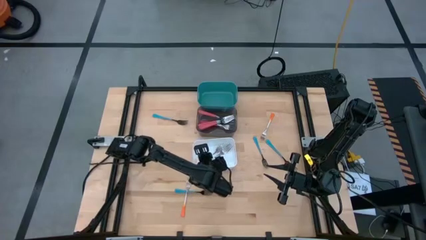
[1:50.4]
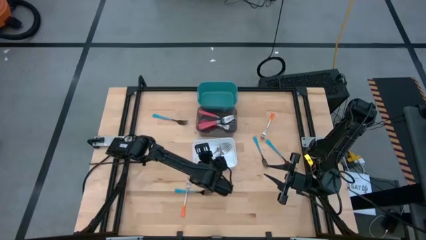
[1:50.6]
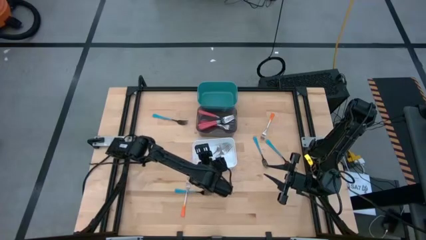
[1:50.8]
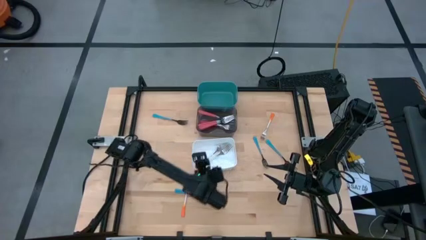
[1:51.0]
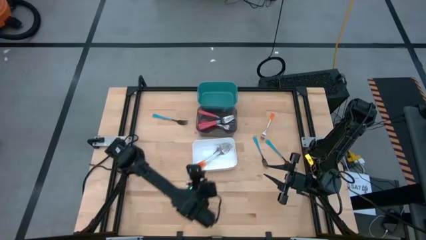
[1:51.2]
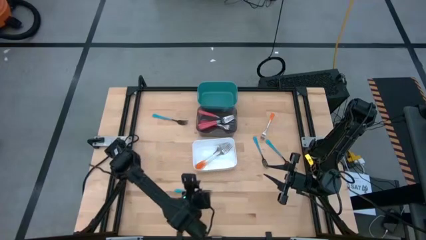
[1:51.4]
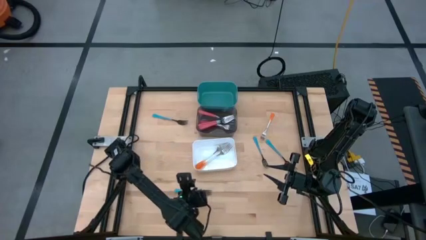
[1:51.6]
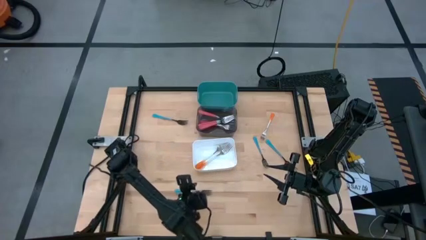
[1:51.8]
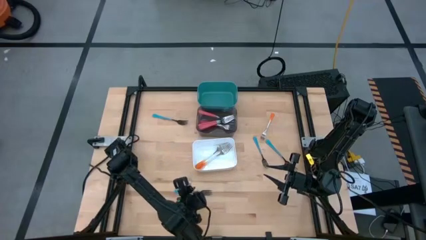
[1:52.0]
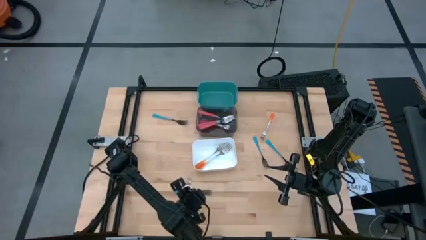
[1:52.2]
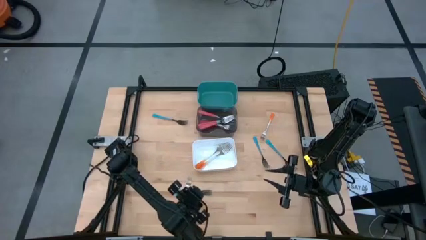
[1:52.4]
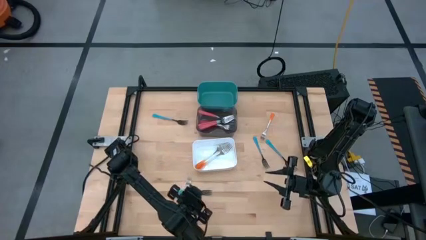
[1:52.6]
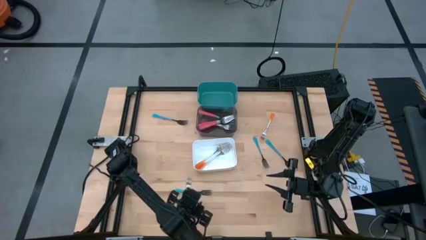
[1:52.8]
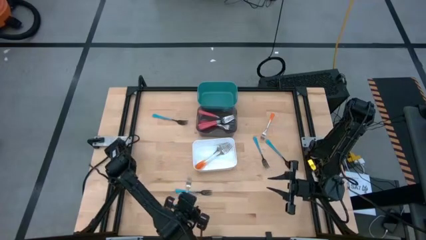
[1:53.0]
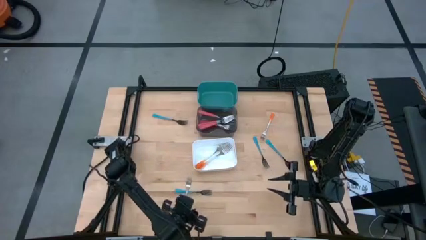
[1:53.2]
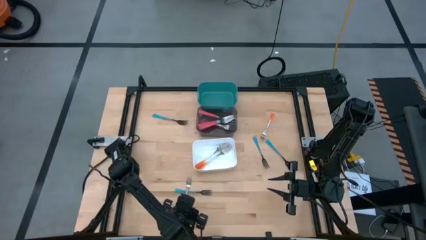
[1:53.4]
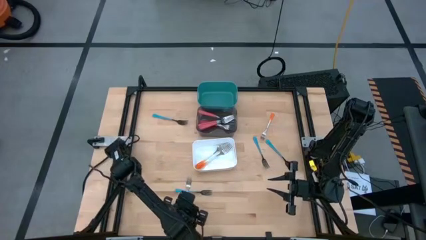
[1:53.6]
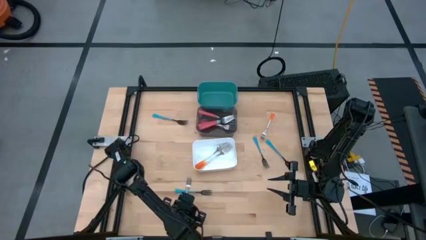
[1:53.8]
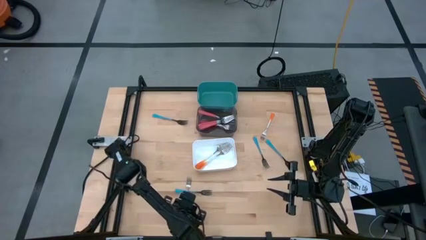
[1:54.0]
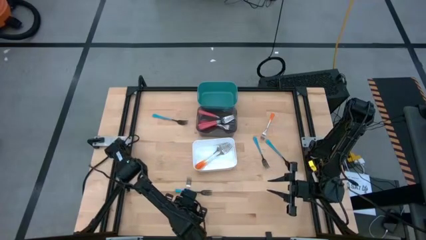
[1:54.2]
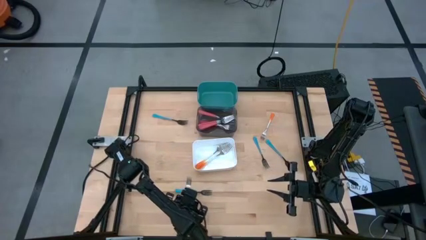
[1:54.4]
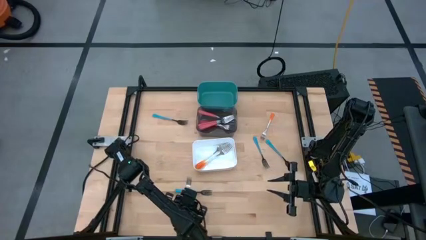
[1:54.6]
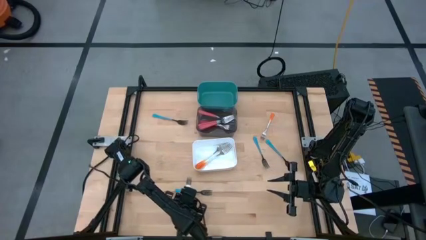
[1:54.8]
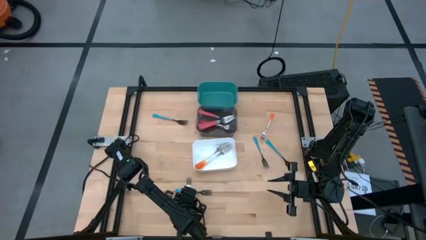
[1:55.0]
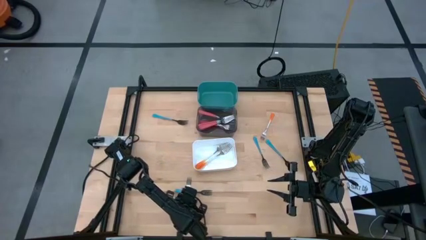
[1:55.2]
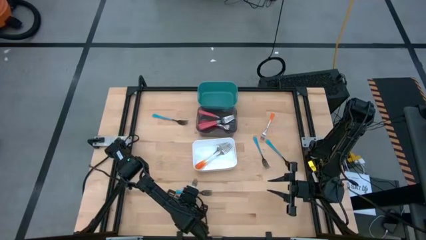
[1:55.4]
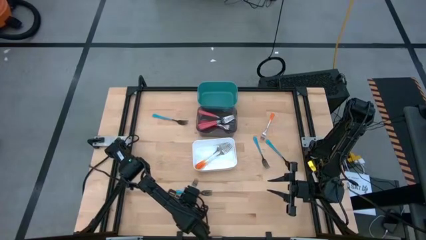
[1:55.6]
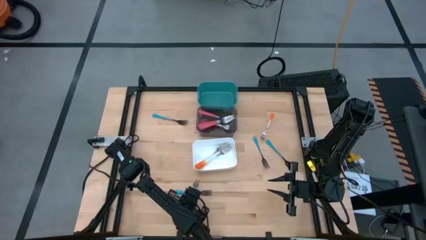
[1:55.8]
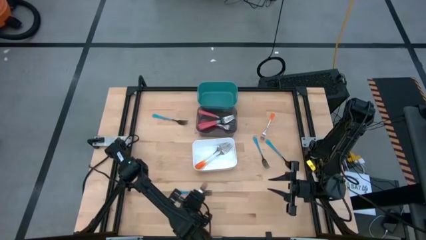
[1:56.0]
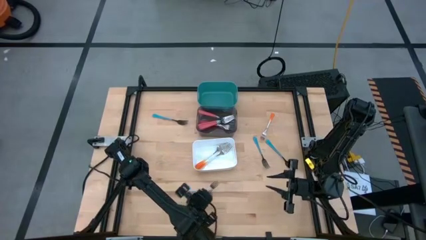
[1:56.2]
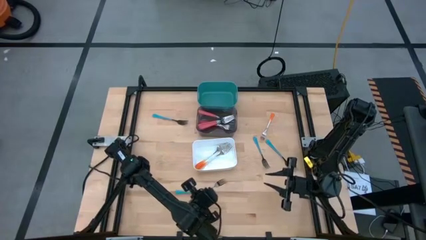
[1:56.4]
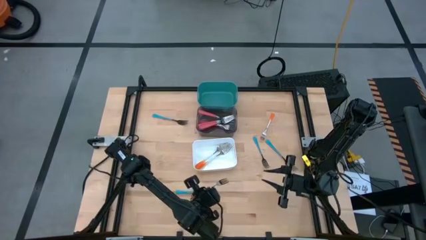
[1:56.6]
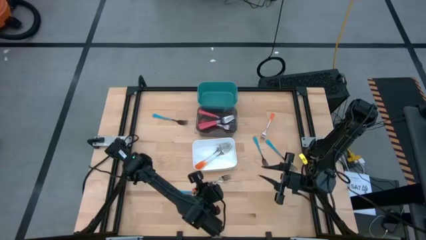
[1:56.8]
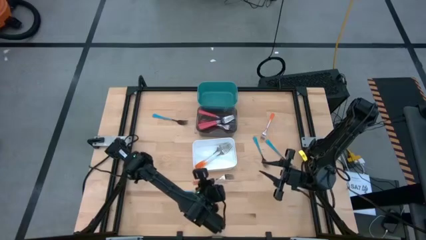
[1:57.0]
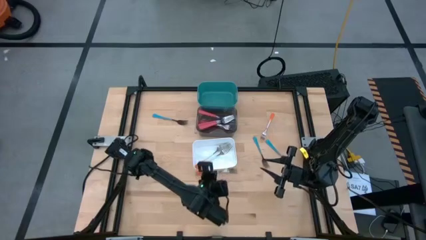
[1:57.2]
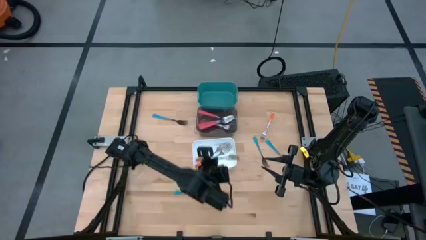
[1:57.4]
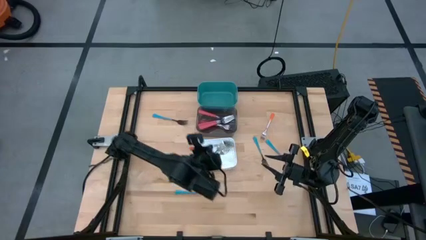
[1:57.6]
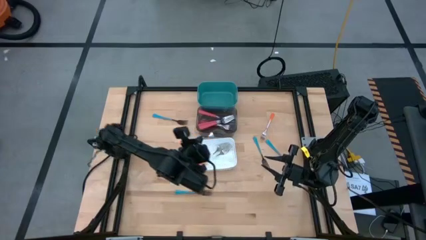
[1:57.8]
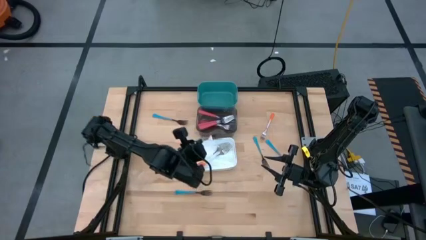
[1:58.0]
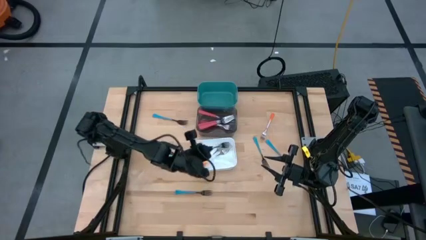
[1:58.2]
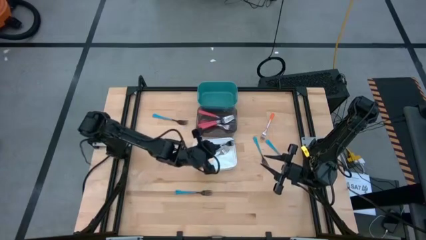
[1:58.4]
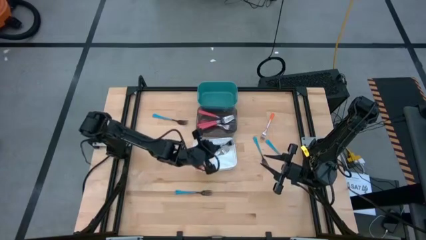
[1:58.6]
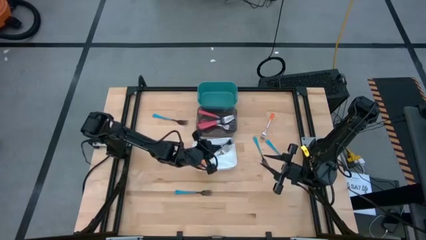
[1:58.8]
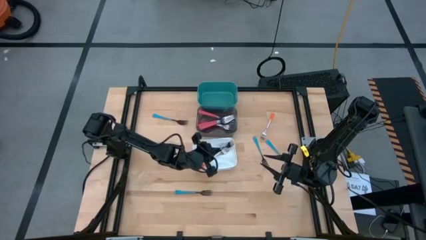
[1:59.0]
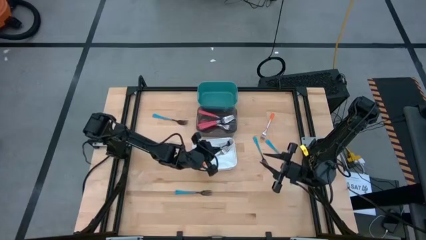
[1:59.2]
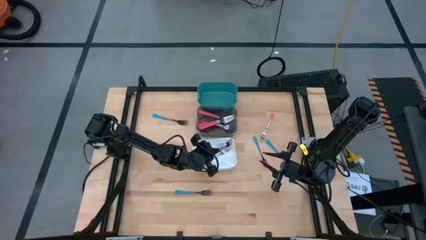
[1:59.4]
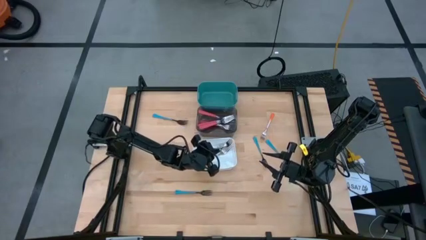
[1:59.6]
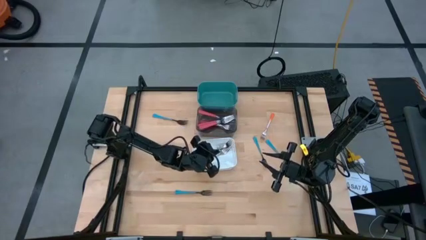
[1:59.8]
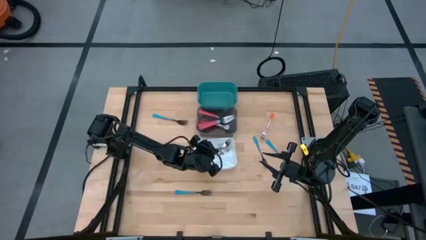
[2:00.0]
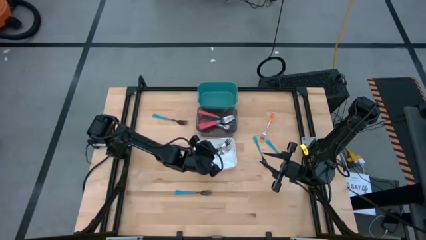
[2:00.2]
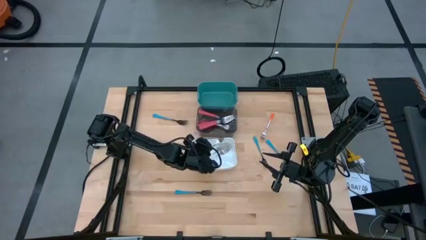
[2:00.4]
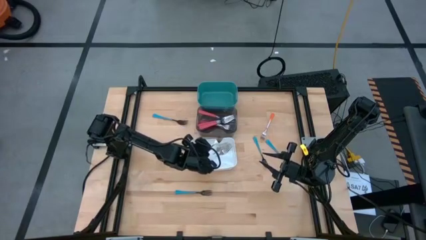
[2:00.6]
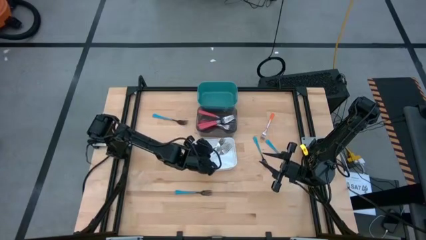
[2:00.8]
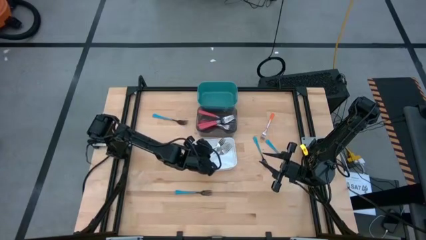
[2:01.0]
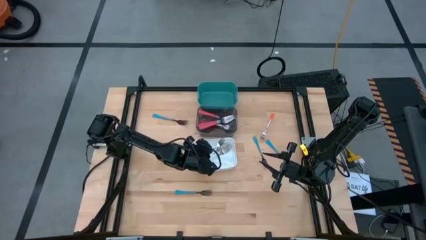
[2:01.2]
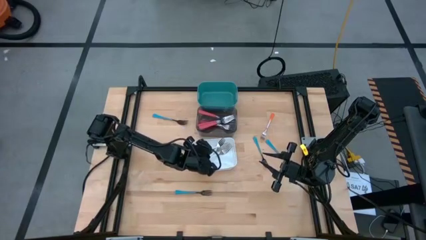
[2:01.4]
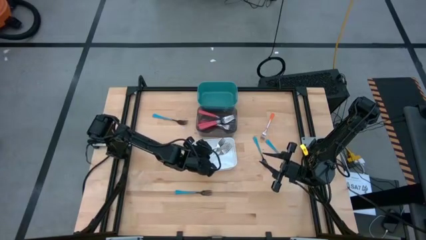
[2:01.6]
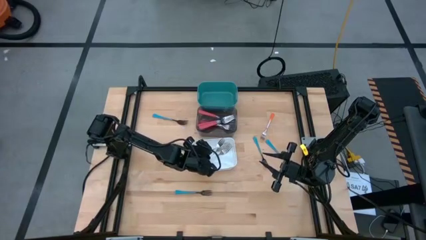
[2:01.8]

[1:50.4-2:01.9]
Task: Sort silverware by color (type)
Put the bottom orange fork into the white bin
